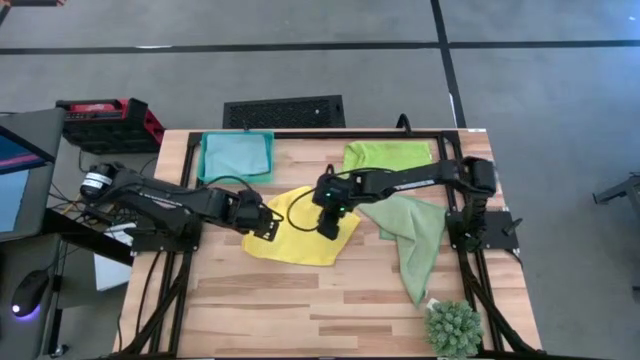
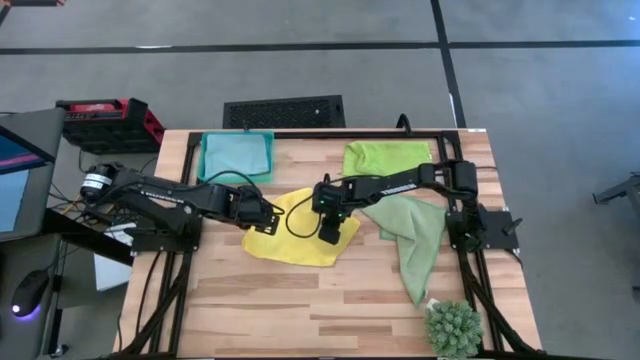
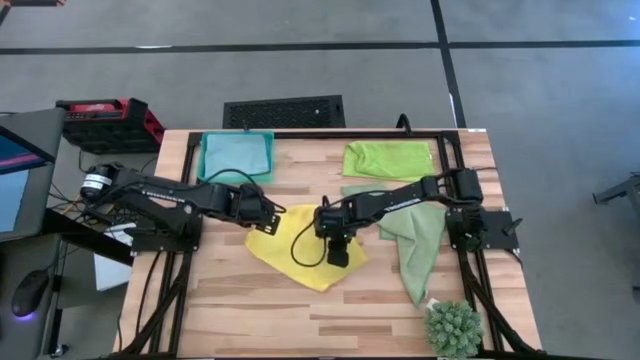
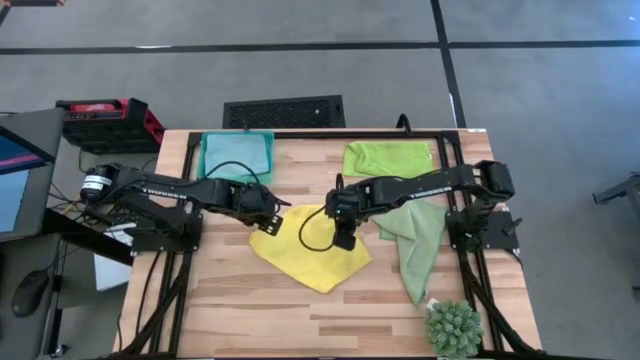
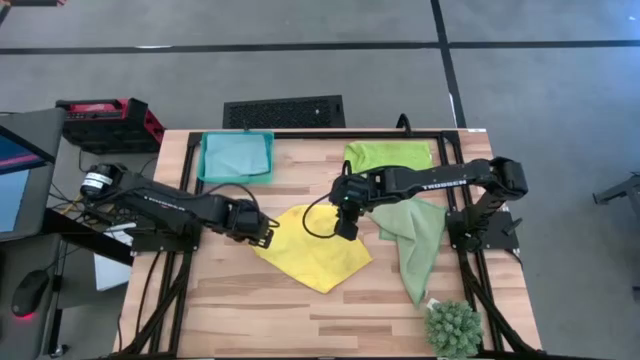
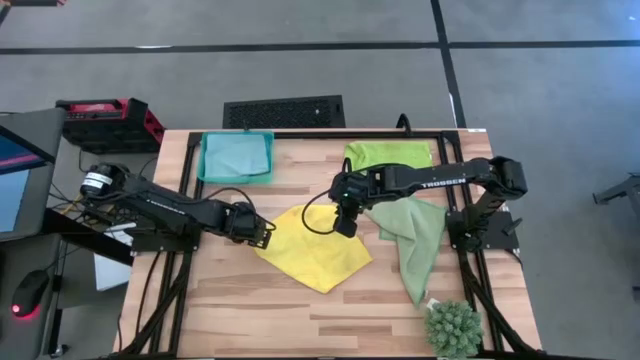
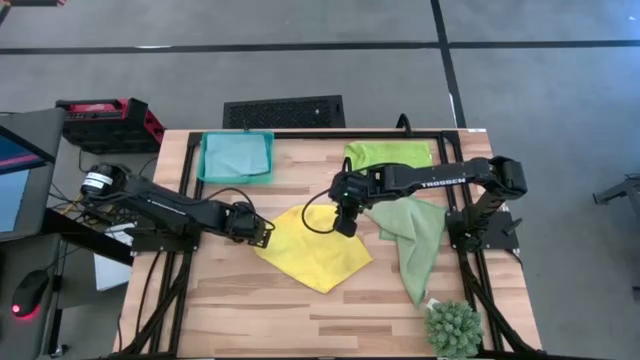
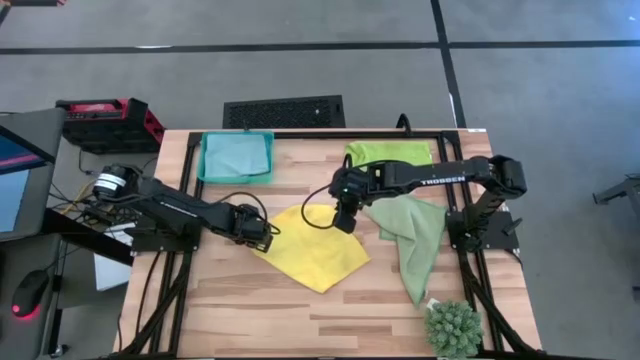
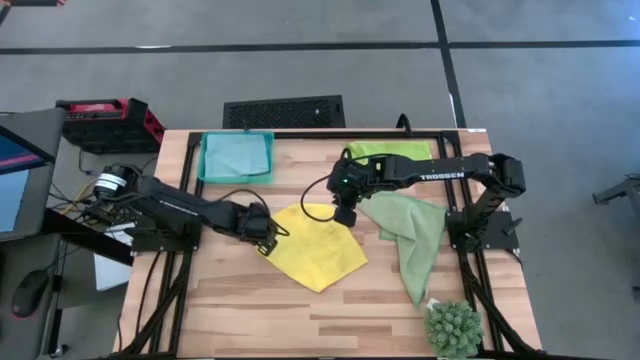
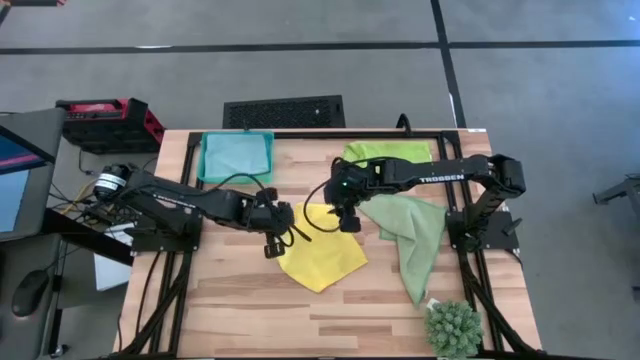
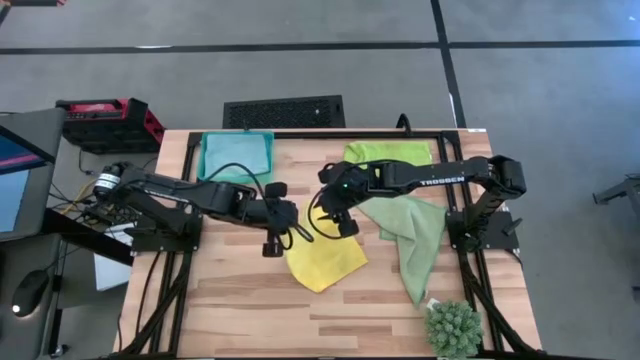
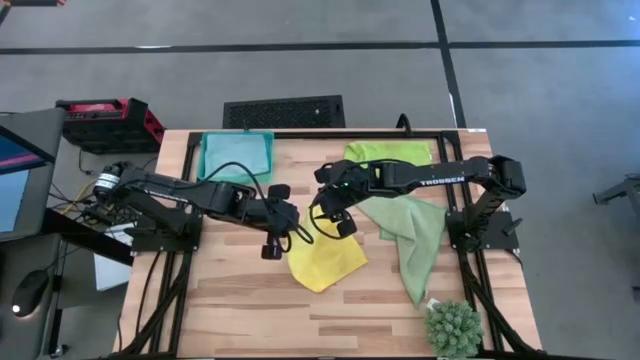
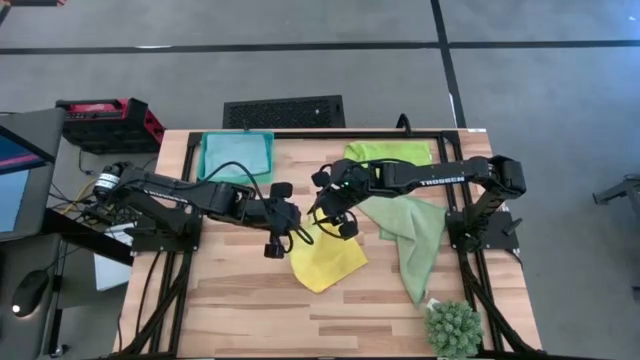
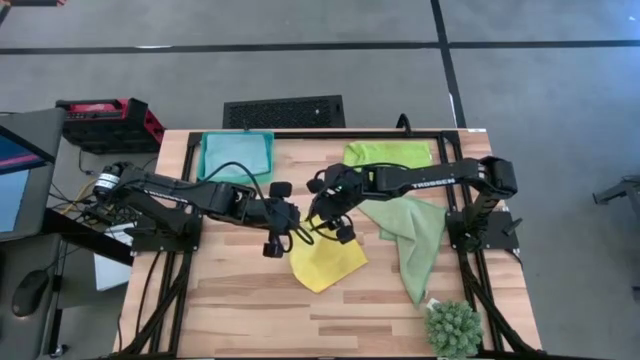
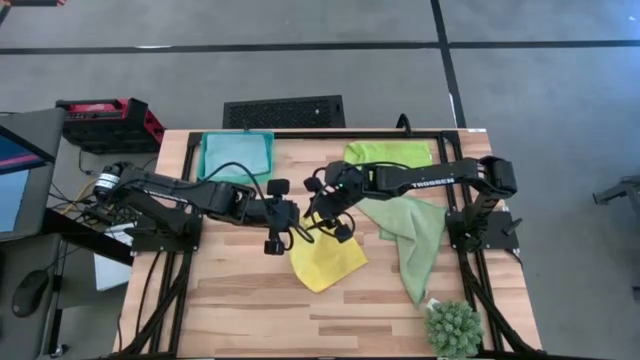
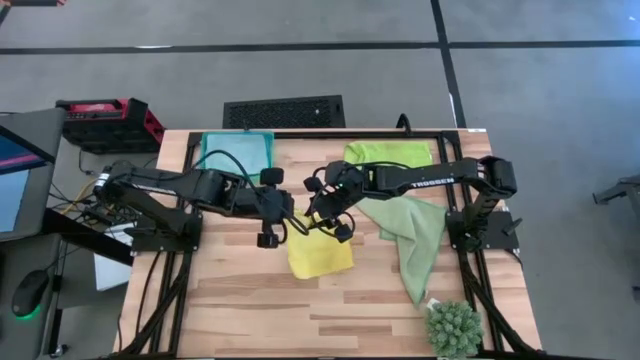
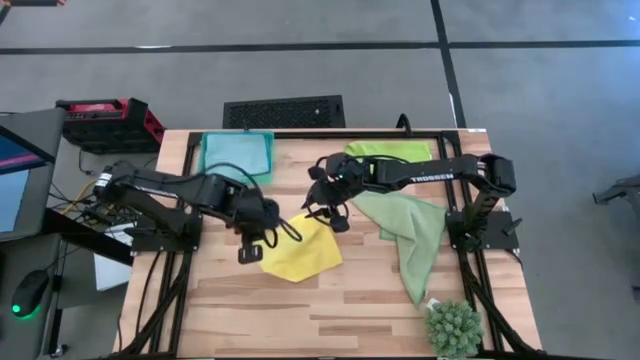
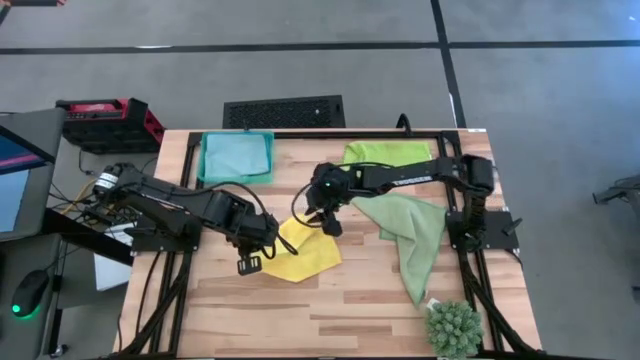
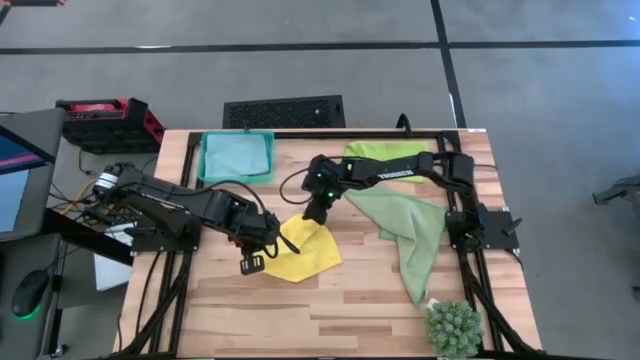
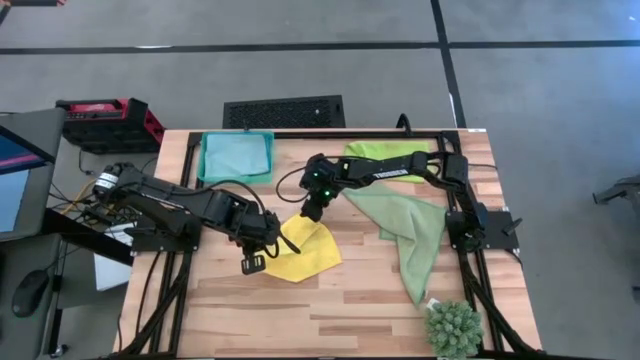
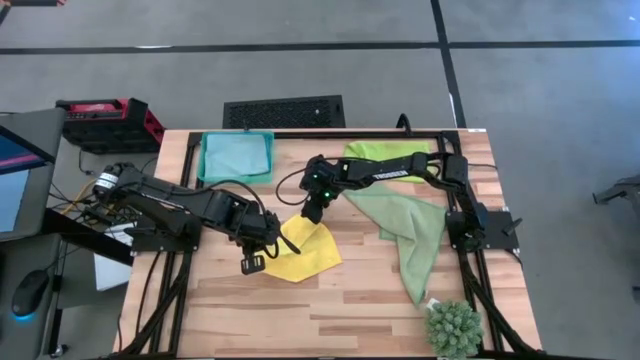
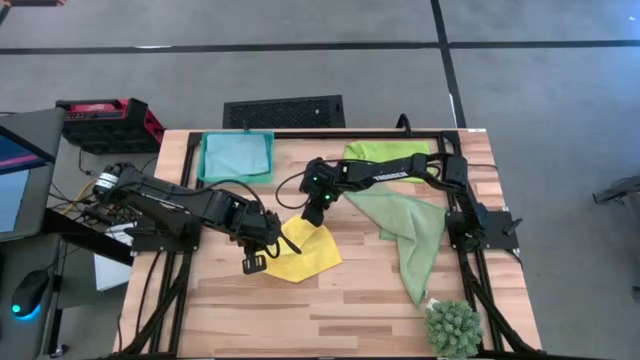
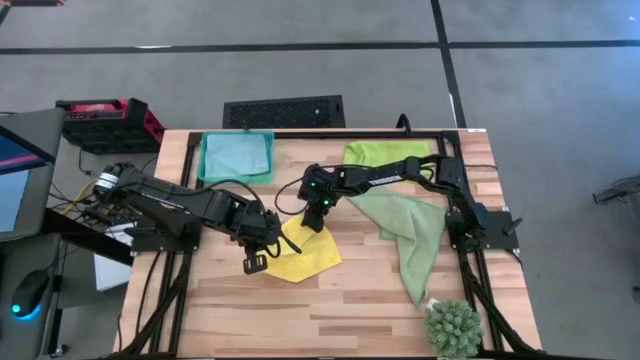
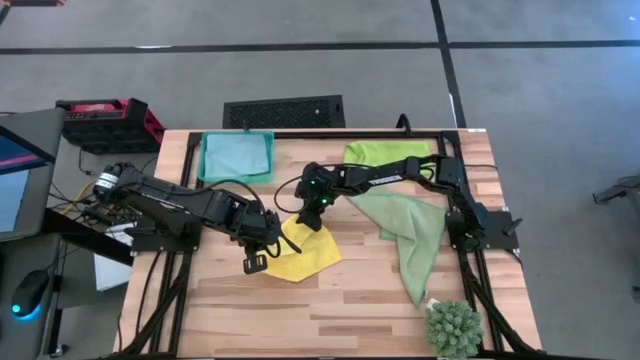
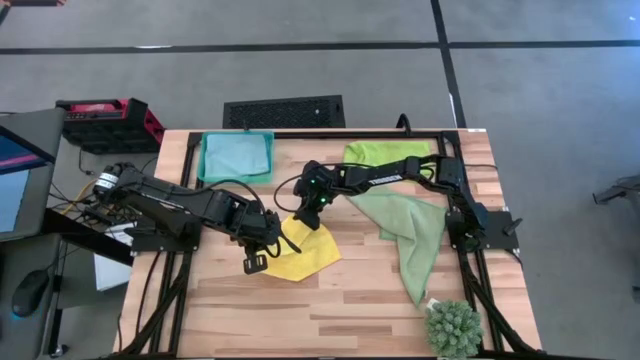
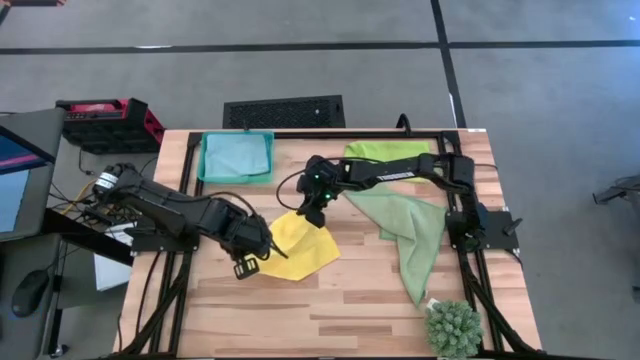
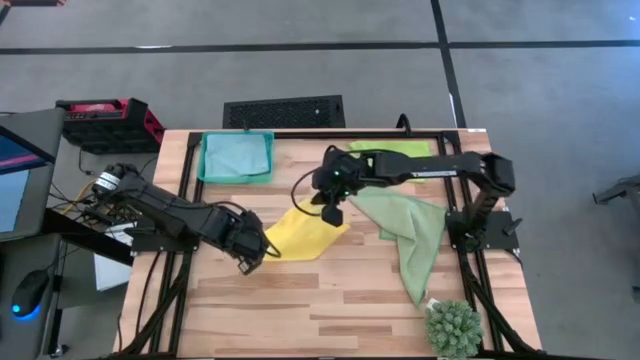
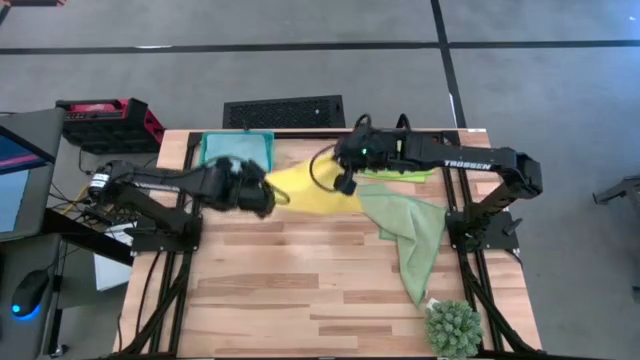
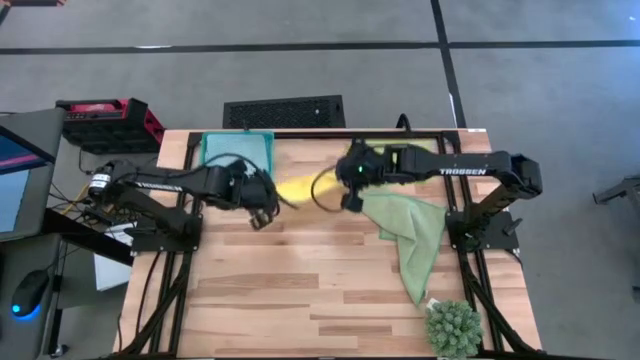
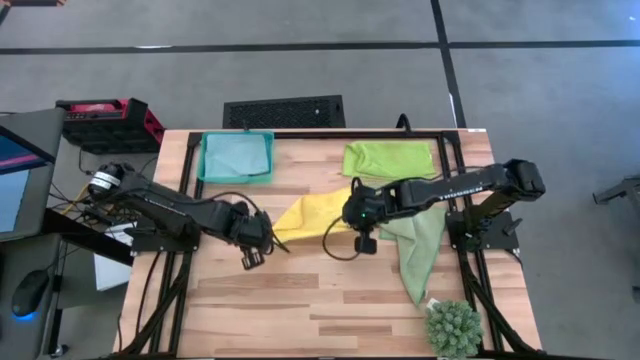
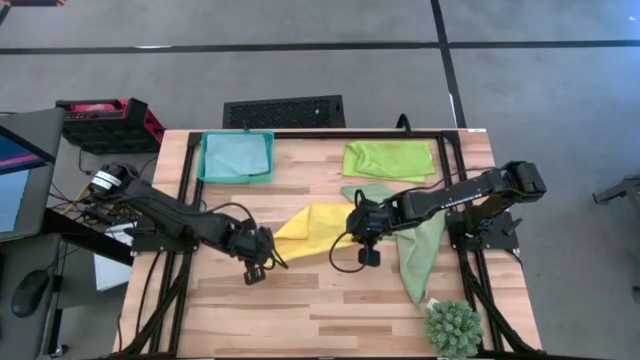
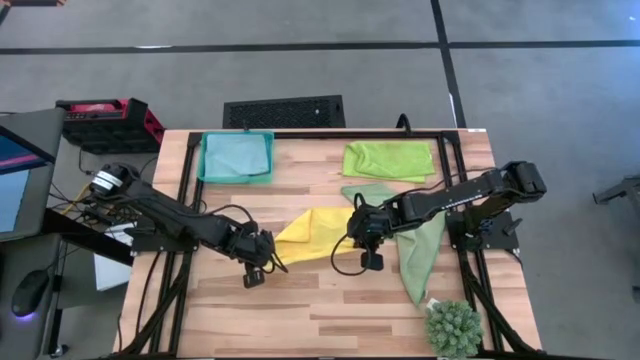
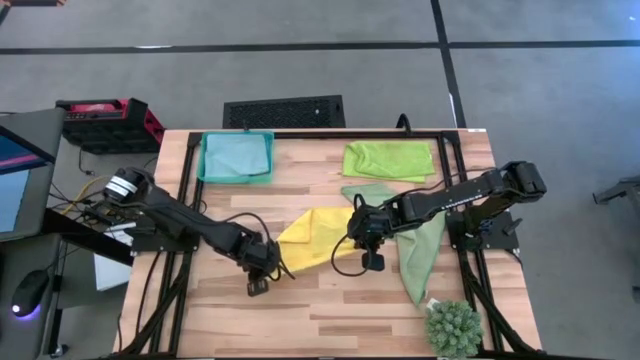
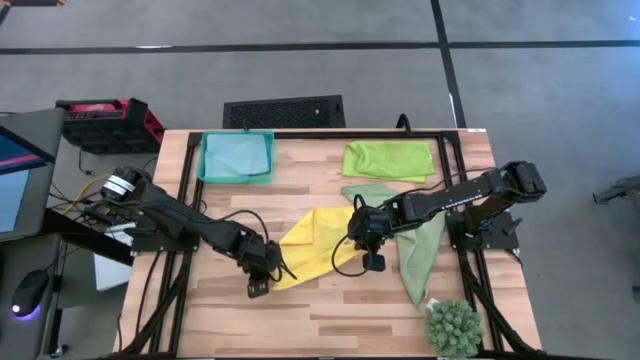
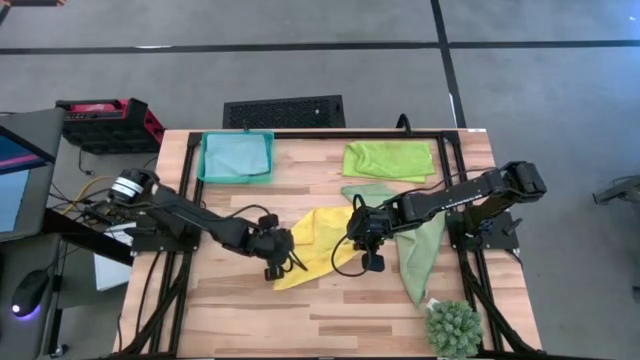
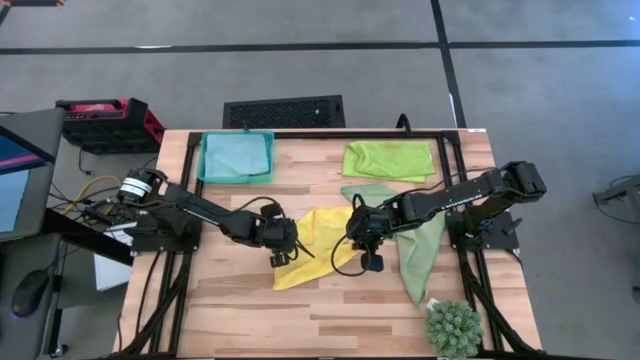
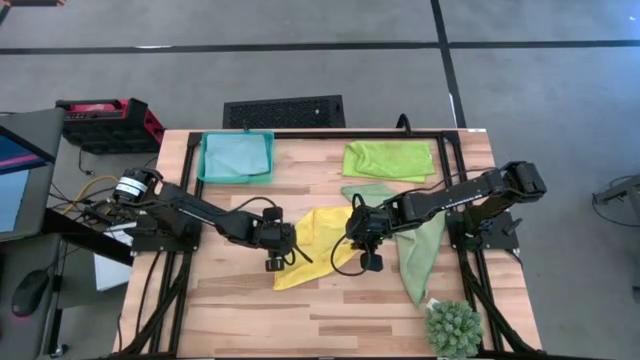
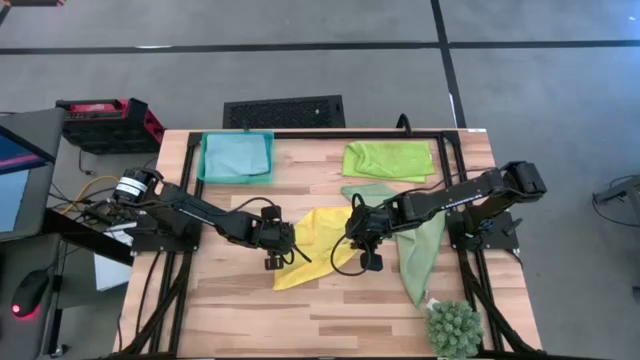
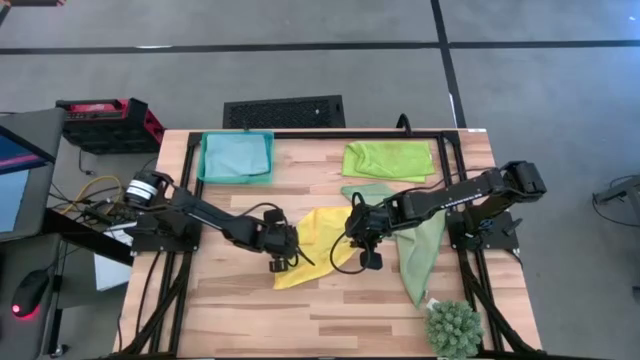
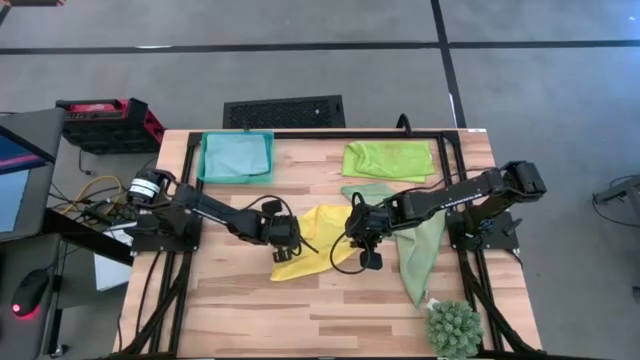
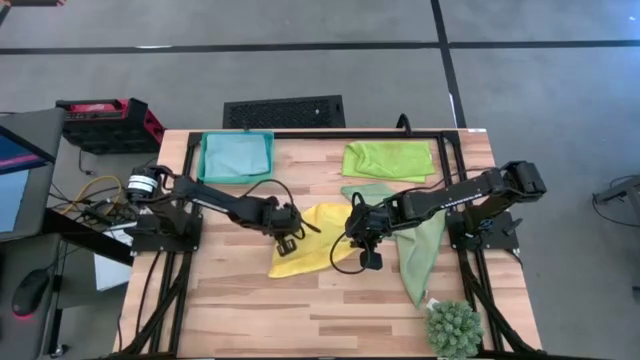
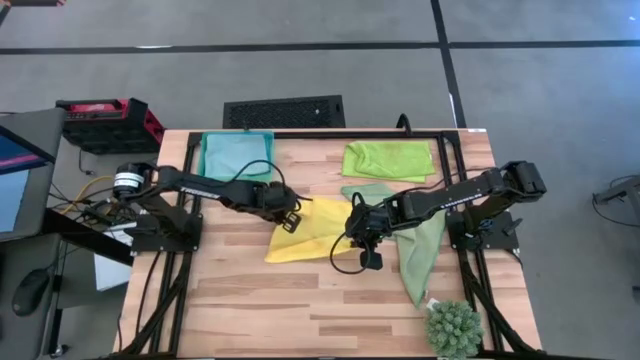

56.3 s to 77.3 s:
Task: Fold microfiber towels
Fold the yellow microfiber towel
